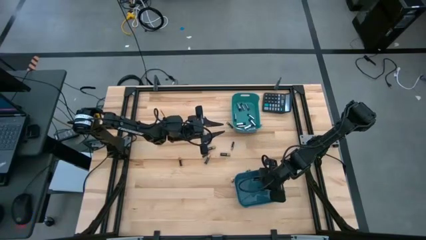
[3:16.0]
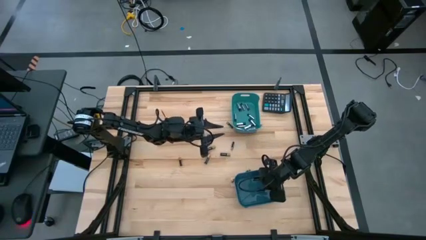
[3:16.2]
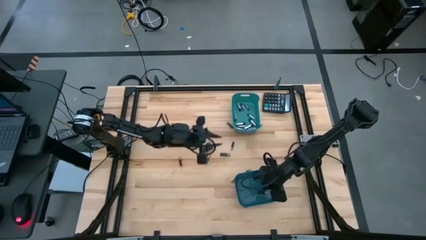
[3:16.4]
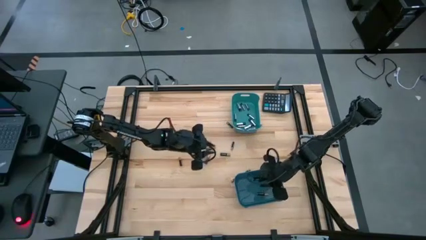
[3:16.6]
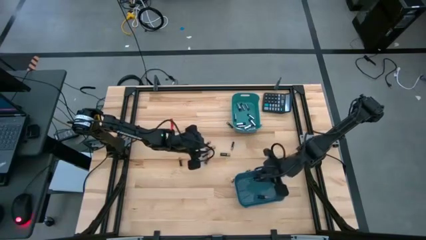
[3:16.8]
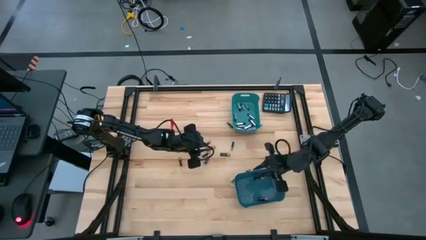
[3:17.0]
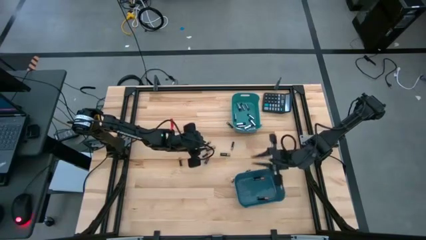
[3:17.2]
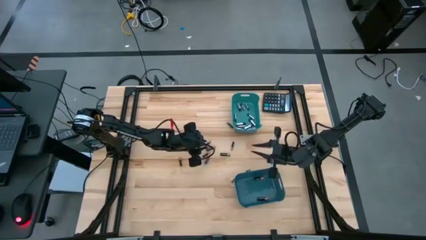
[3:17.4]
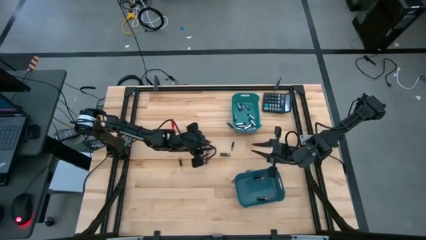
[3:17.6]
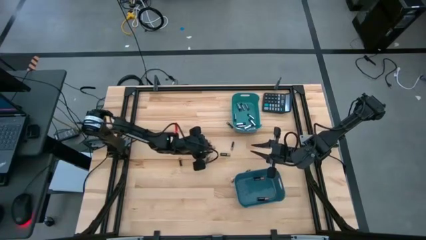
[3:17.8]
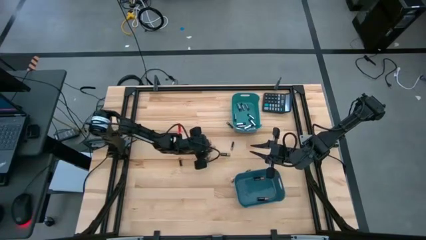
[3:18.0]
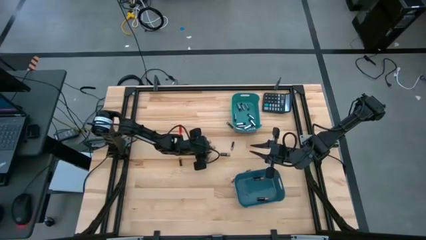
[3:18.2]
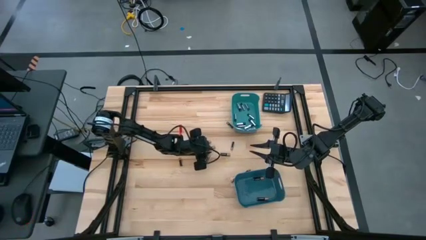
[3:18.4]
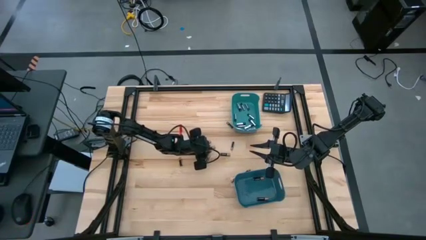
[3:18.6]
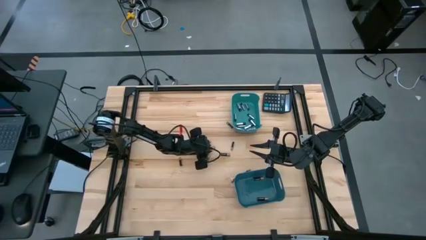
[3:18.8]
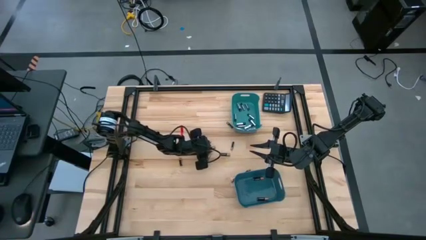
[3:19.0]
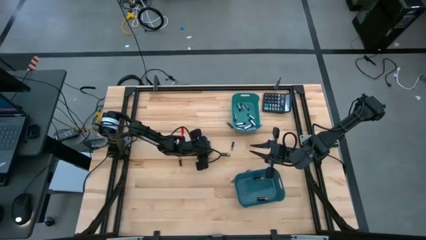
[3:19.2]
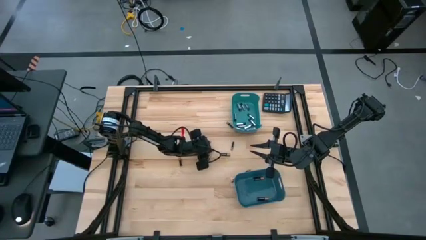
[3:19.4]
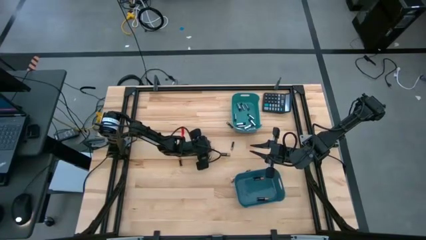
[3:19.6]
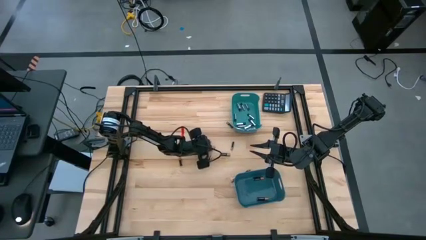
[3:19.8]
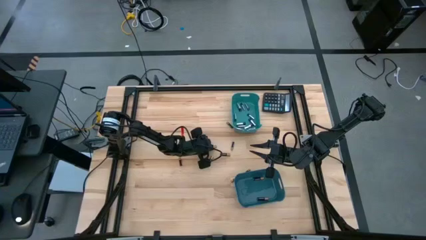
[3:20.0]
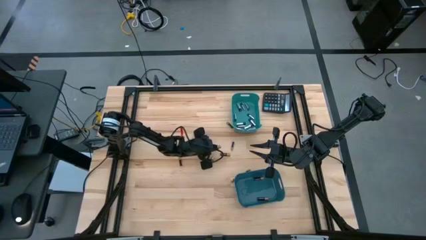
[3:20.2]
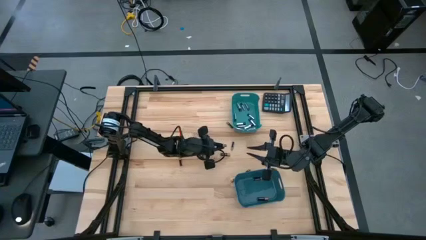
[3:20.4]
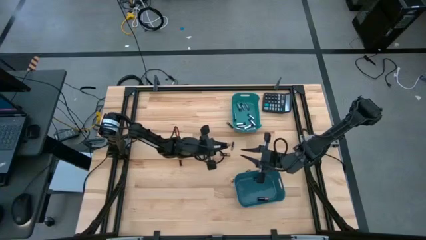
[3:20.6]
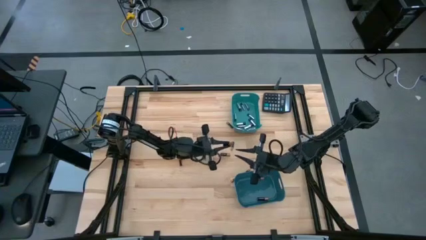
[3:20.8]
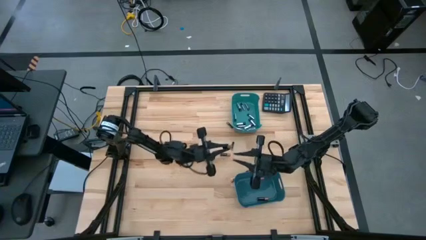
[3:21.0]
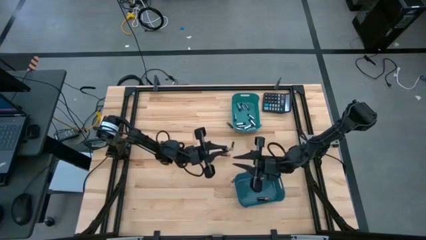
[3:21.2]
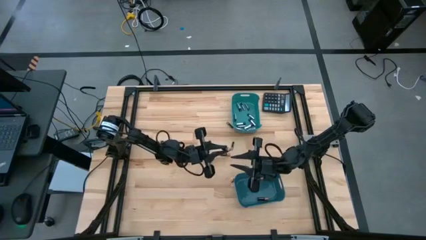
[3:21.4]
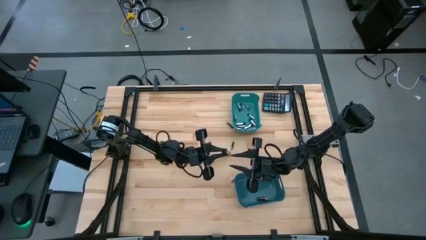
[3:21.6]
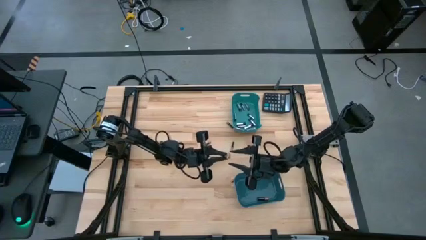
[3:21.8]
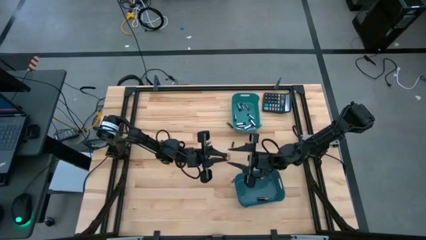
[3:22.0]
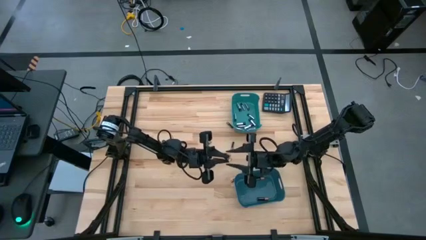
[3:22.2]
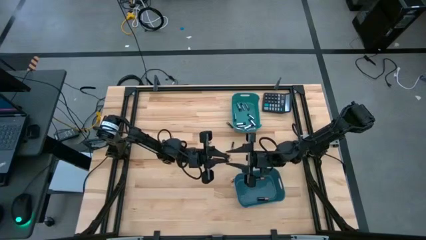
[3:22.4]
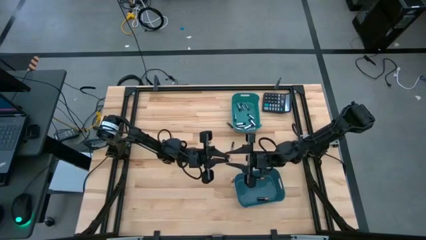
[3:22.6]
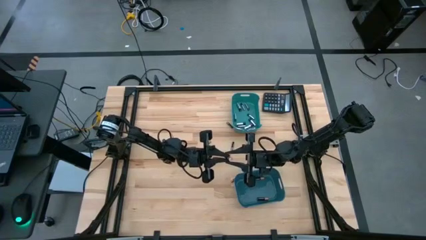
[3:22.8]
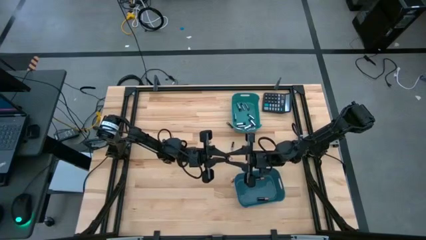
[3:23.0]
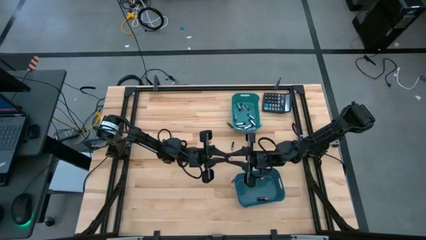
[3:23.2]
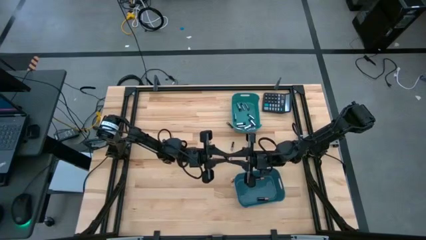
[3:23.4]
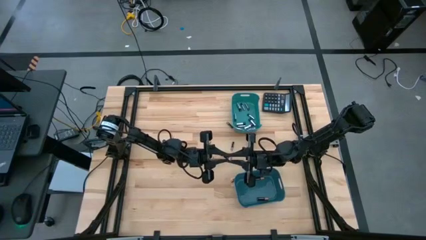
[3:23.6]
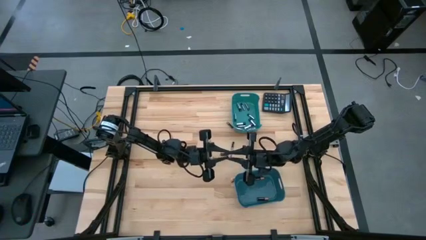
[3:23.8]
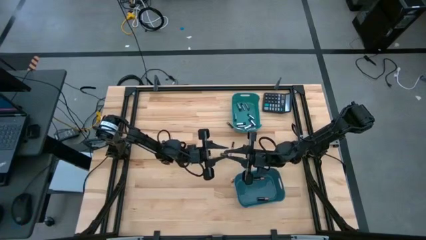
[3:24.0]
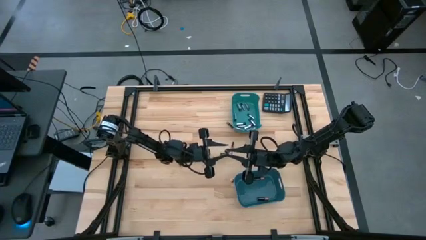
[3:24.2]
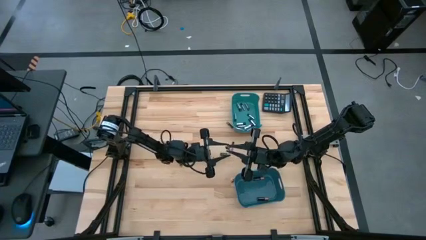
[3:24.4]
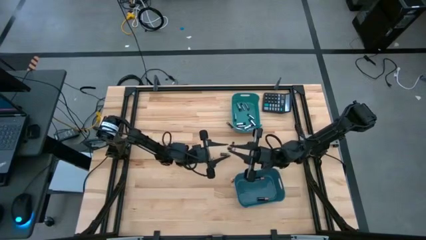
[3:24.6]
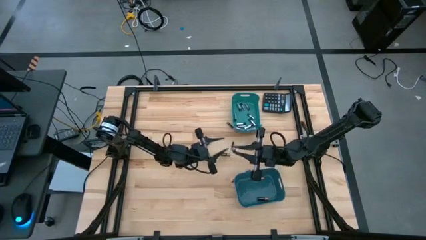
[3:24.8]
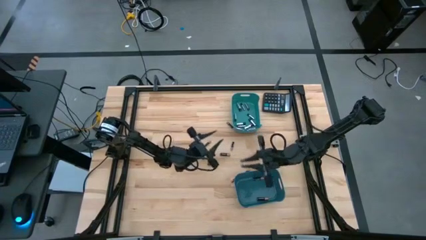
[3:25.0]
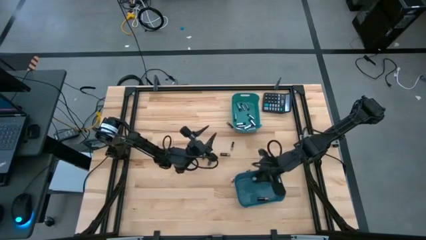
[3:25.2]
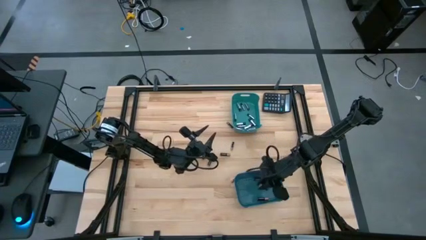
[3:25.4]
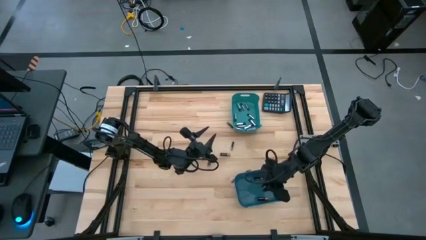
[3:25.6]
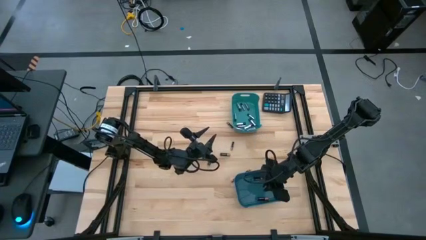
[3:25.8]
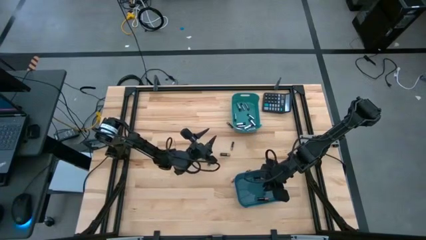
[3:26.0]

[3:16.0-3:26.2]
Task: Sort batteries
Put the black battery into the blue bin

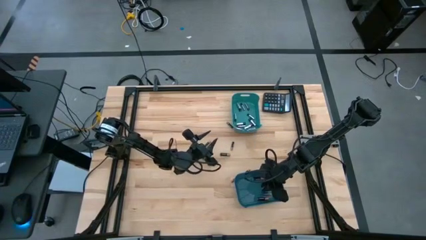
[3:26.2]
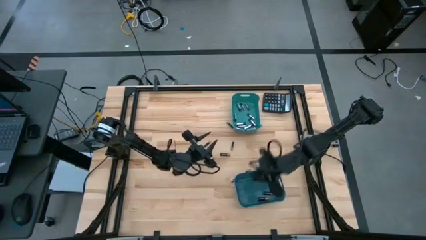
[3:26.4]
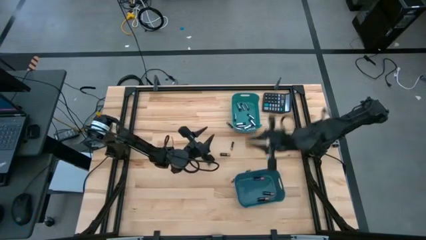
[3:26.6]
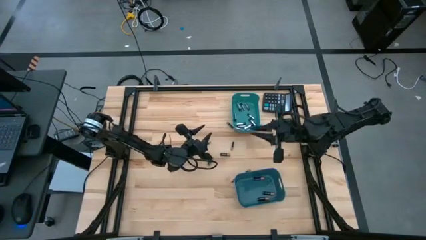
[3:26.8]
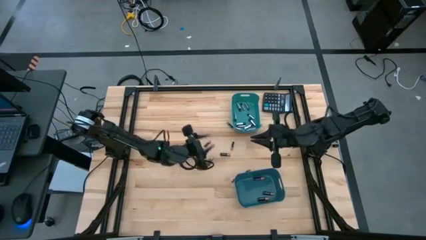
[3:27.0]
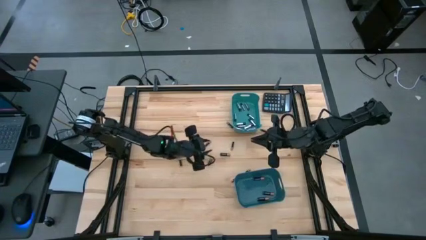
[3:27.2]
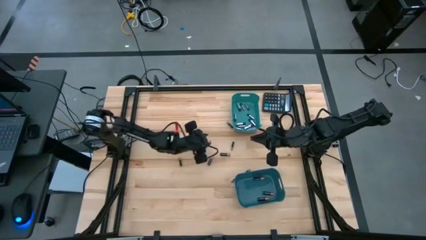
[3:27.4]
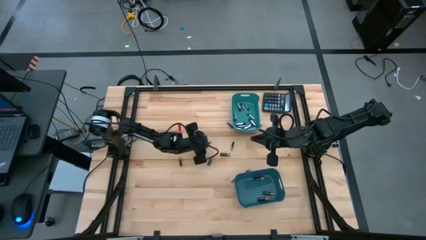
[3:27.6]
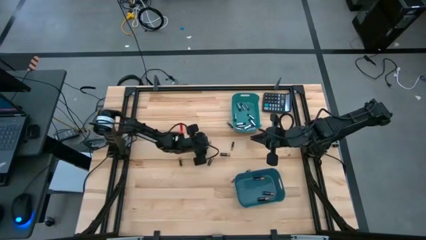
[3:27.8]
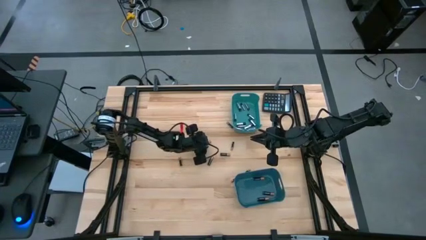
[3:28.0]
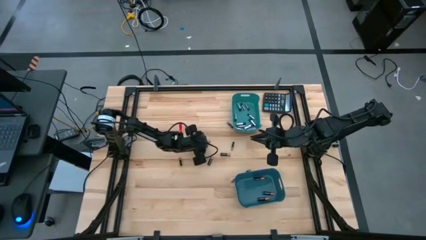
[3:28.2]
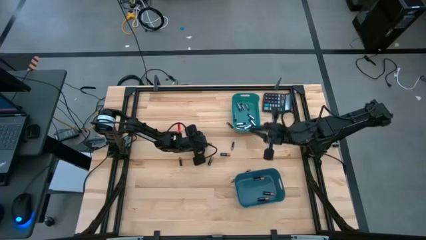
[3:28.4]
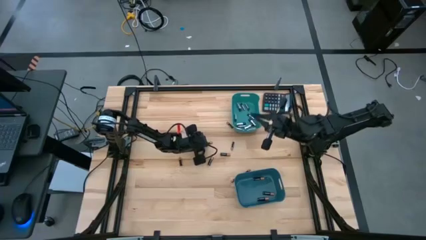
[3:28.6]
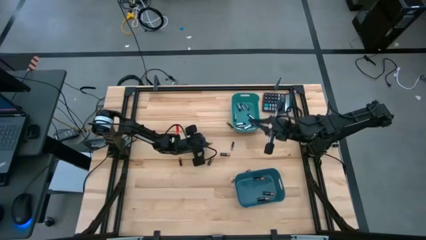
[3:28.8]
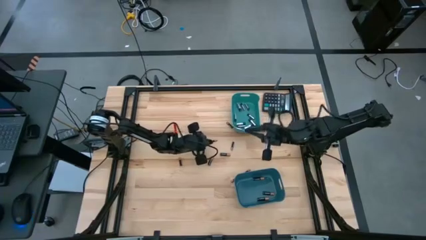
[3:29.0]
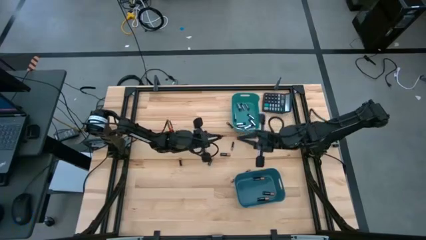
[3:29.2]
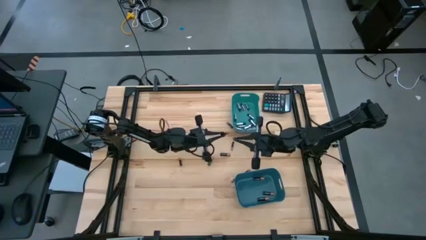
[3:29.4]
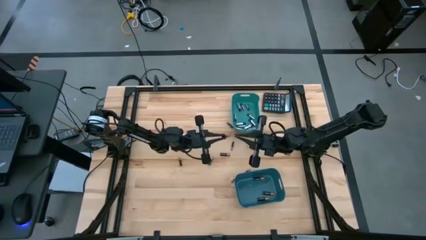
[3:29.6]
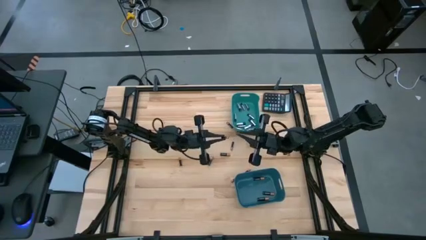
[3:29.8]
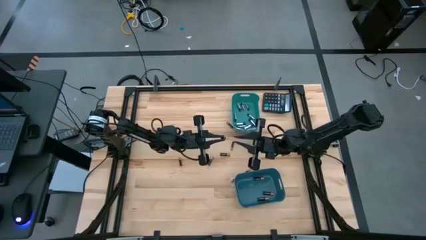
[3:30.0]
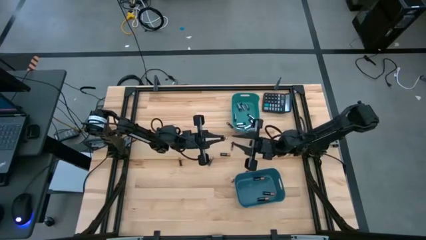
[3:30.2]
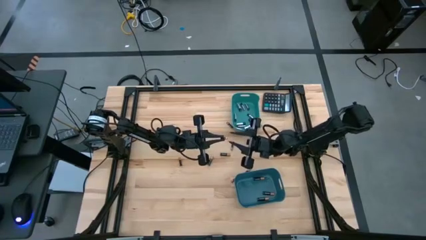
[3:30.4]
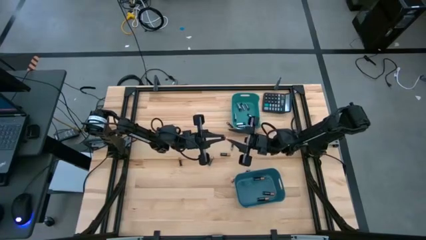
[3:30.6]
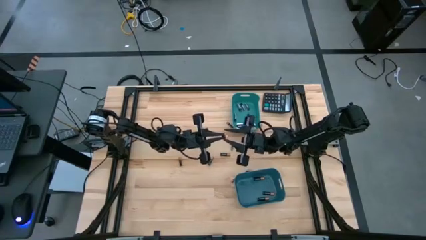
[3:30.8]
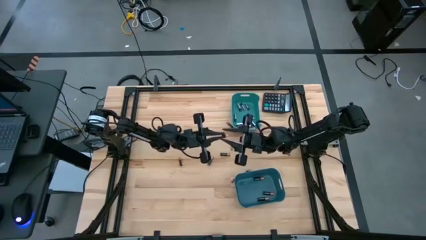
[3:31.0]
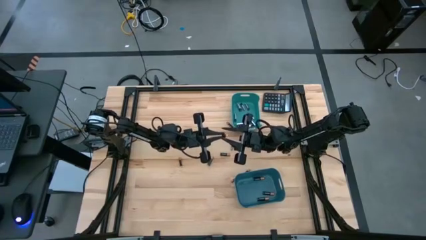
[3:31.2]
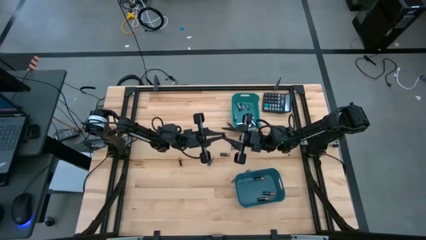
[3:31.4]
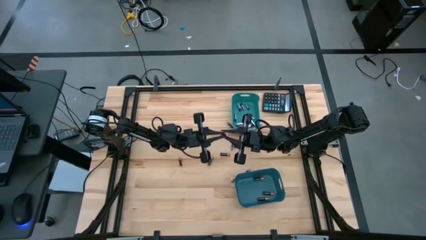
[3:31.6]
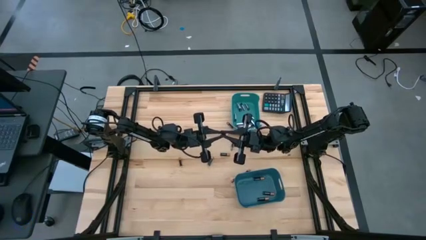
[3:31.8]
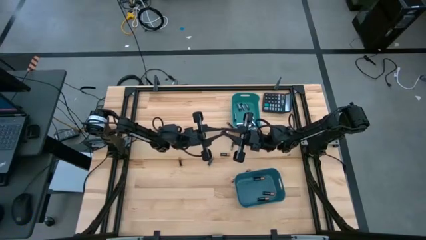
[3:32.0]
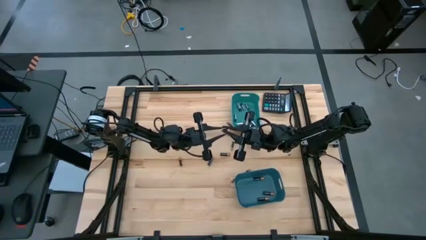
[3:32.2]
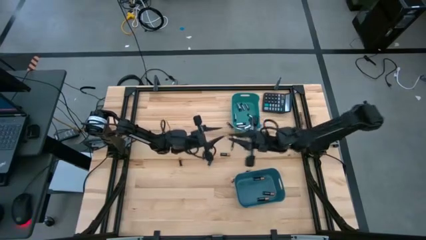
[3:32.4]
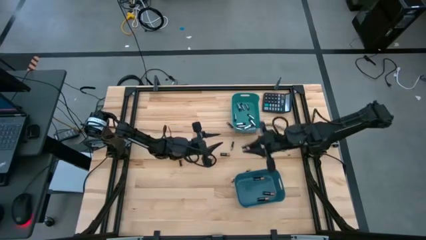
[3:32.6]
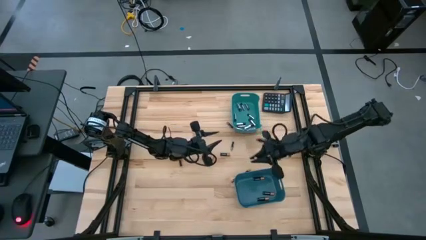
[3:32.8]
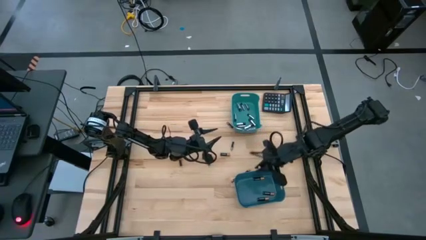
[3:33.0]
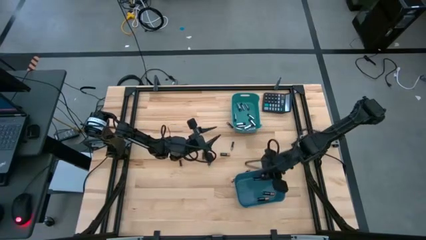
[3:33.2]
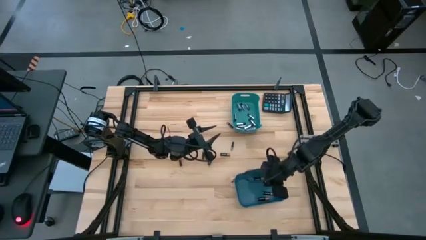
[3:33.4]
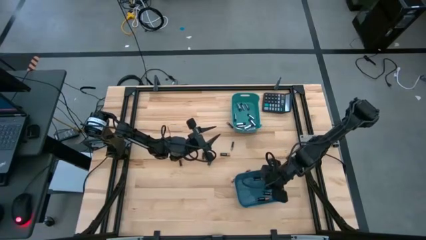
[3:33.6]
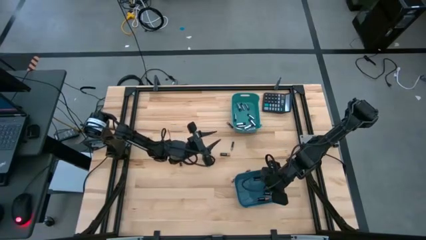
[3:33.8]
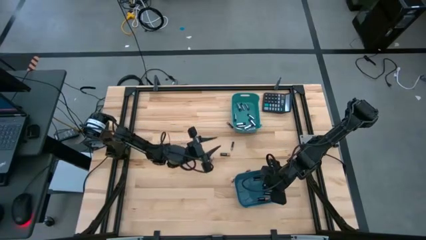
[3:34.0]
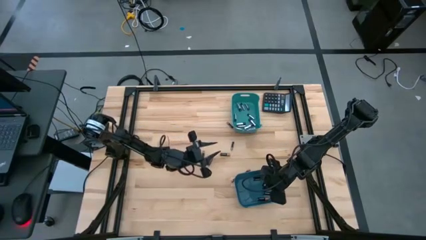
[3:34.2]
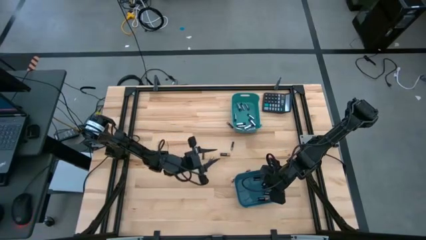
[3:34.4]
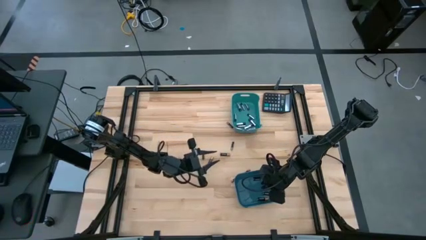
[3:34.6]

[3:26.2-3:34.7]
Put the black battery into the blue bin
